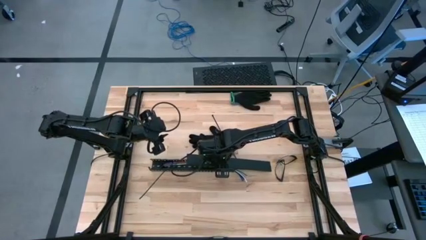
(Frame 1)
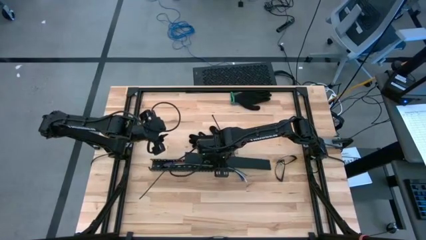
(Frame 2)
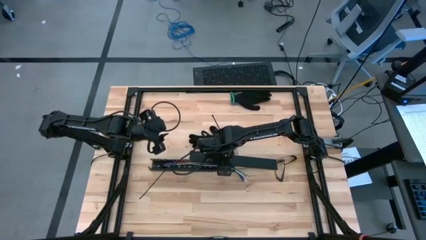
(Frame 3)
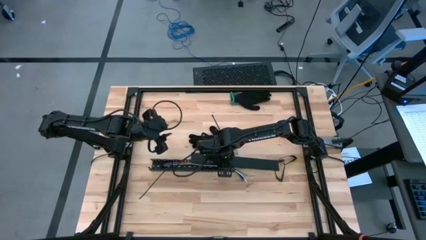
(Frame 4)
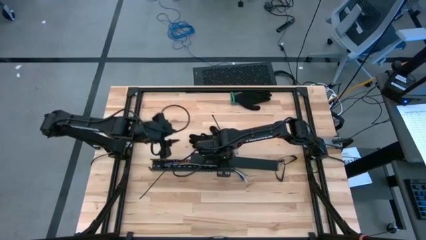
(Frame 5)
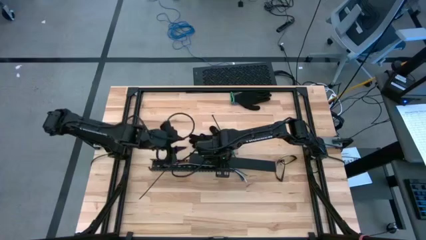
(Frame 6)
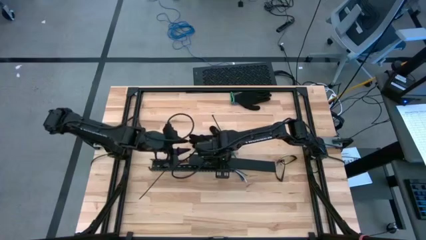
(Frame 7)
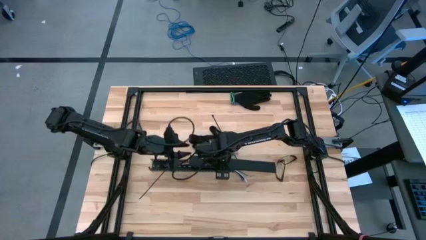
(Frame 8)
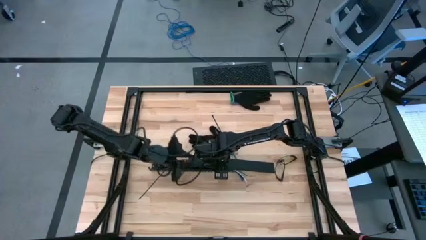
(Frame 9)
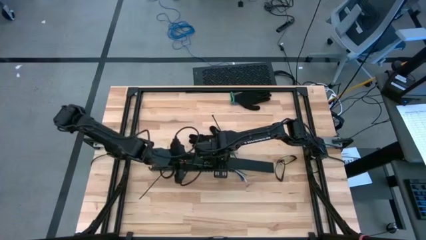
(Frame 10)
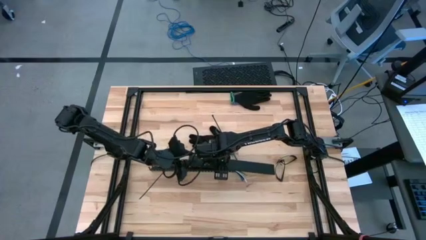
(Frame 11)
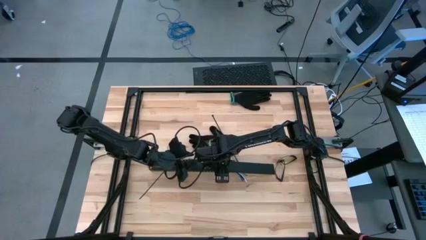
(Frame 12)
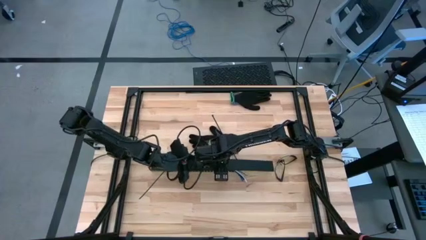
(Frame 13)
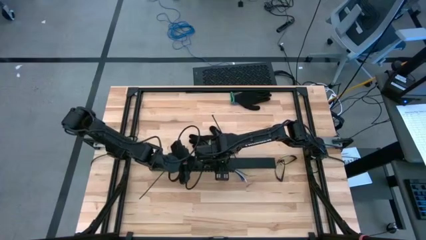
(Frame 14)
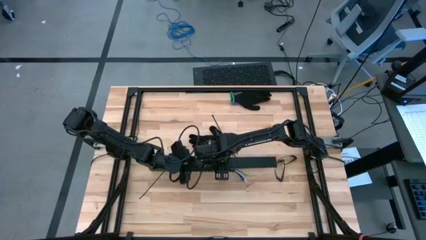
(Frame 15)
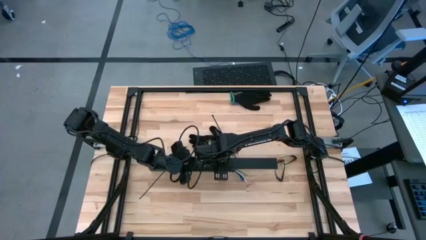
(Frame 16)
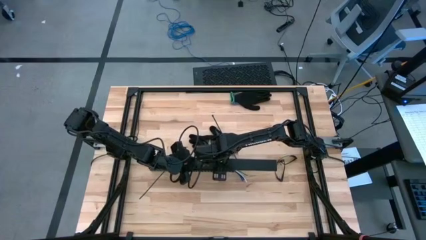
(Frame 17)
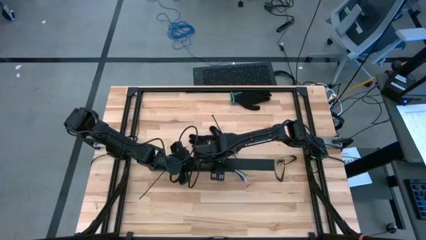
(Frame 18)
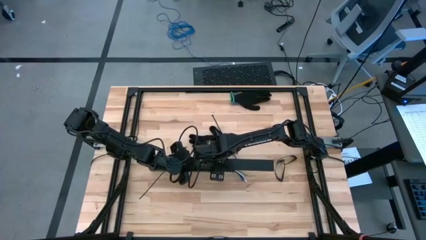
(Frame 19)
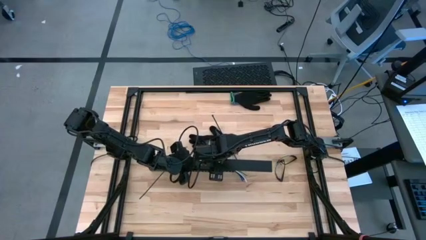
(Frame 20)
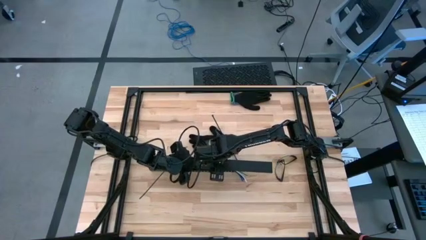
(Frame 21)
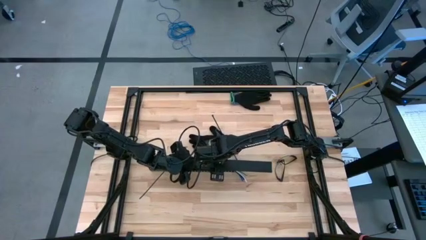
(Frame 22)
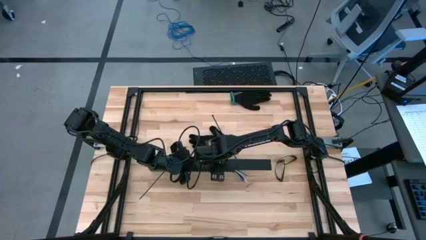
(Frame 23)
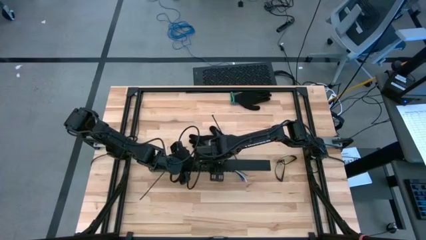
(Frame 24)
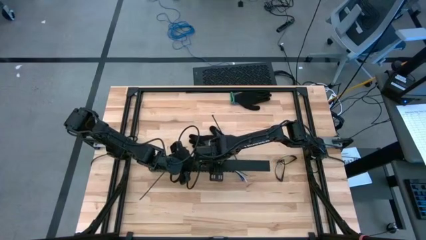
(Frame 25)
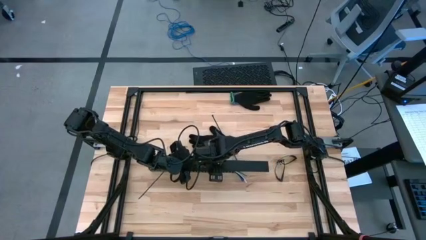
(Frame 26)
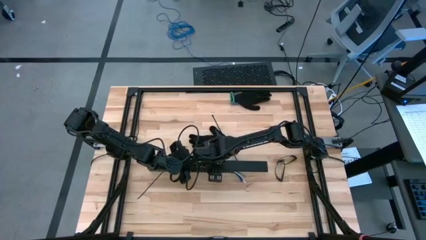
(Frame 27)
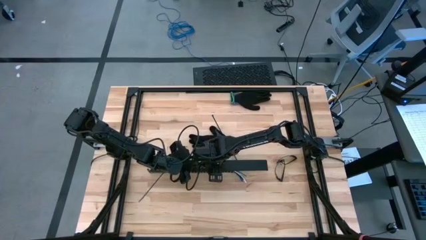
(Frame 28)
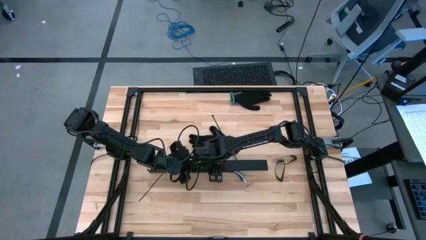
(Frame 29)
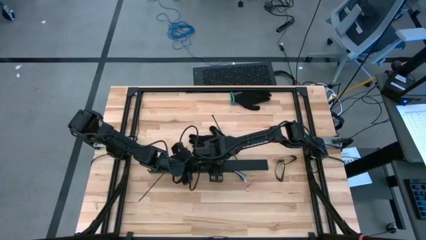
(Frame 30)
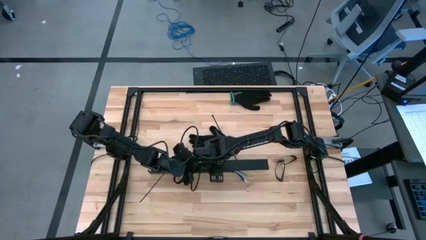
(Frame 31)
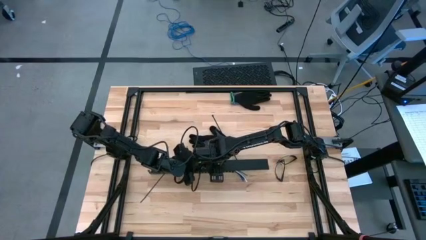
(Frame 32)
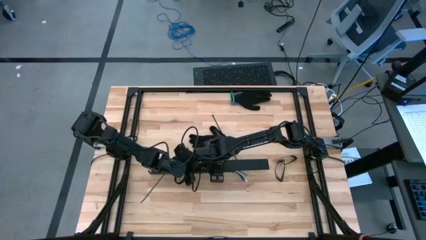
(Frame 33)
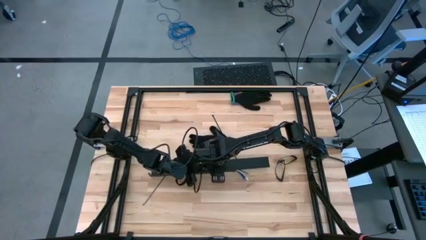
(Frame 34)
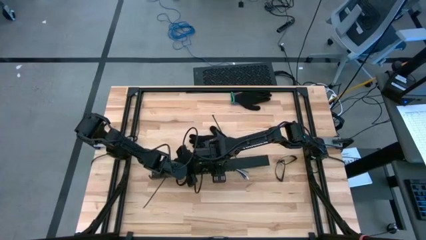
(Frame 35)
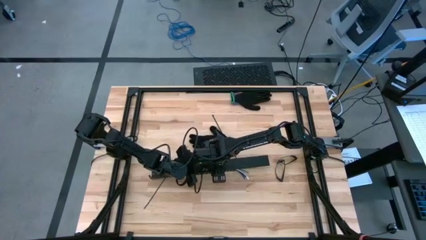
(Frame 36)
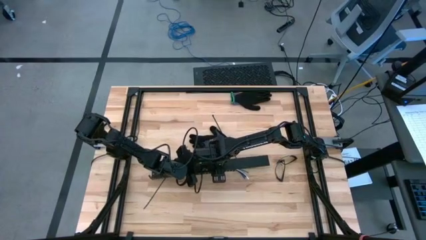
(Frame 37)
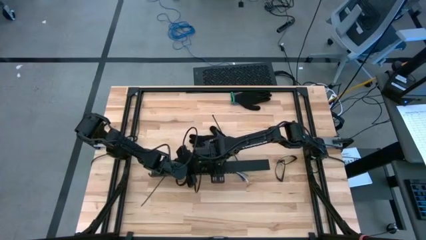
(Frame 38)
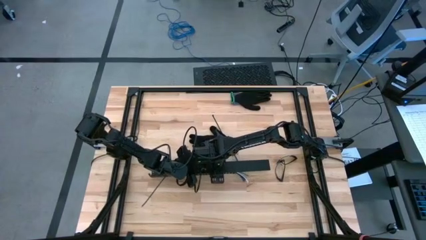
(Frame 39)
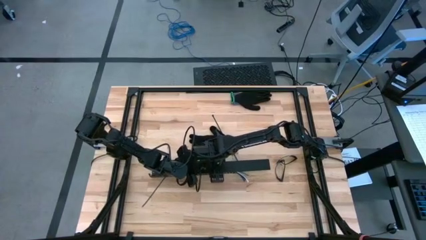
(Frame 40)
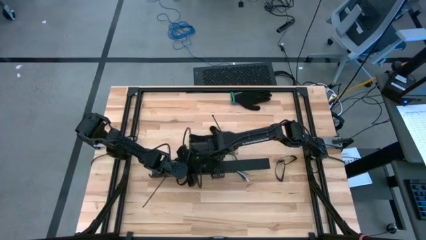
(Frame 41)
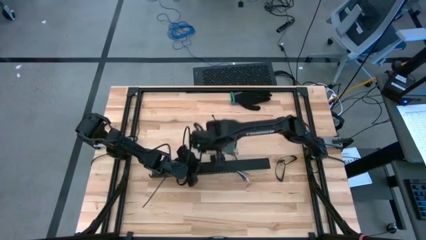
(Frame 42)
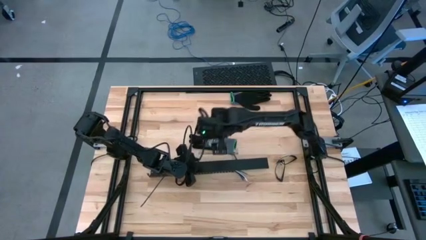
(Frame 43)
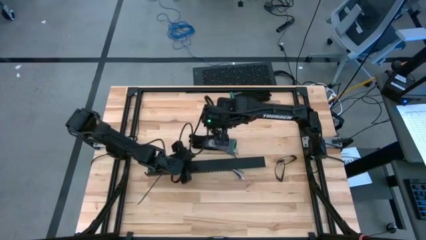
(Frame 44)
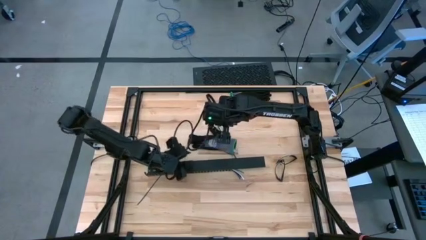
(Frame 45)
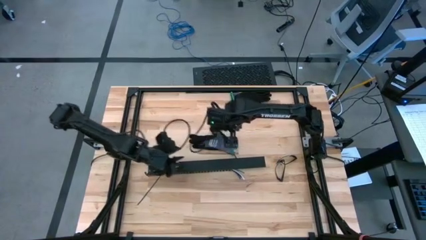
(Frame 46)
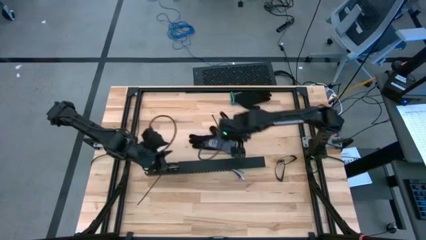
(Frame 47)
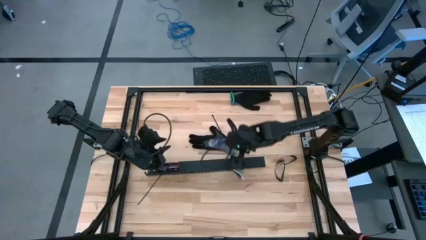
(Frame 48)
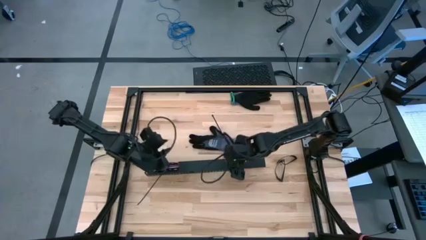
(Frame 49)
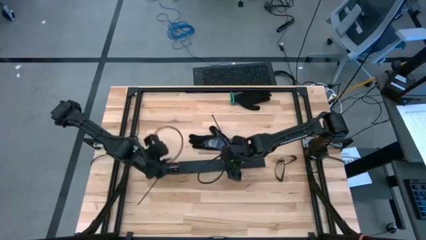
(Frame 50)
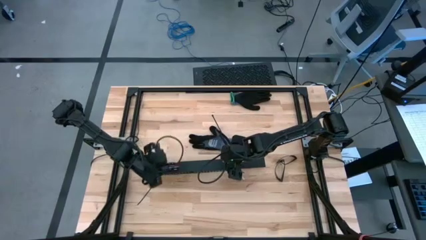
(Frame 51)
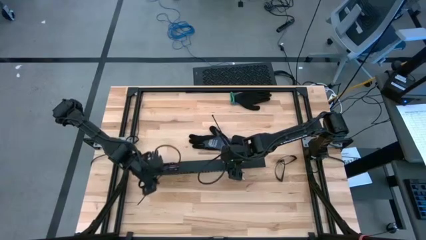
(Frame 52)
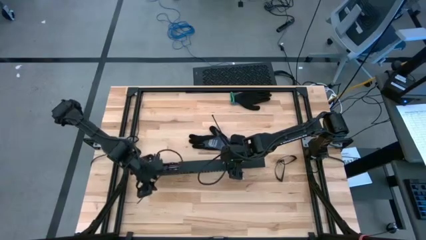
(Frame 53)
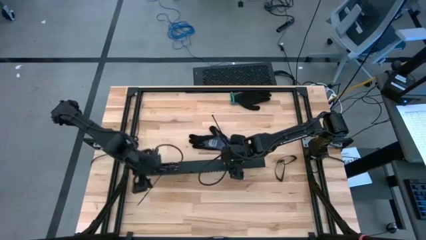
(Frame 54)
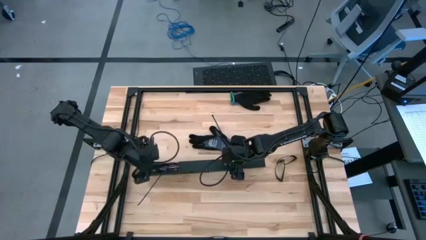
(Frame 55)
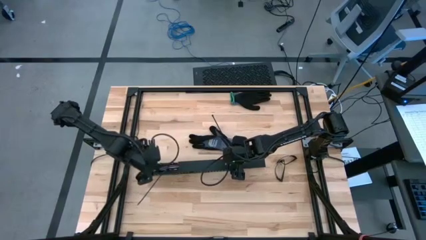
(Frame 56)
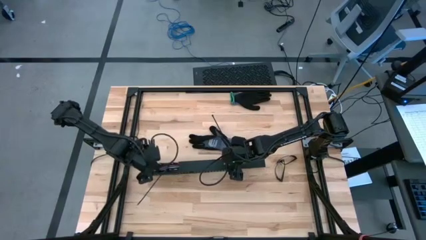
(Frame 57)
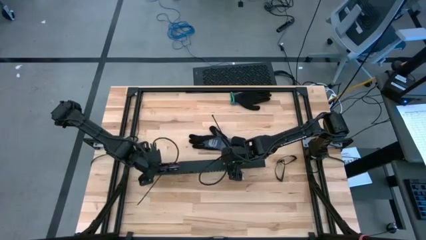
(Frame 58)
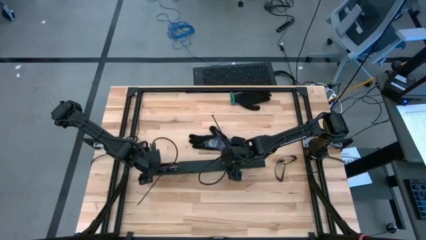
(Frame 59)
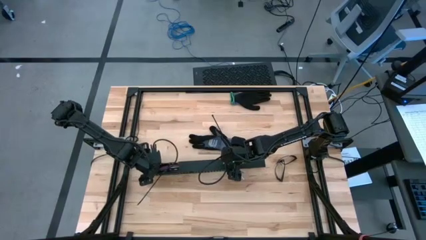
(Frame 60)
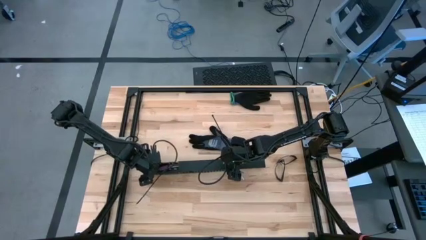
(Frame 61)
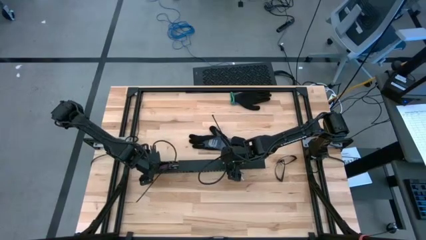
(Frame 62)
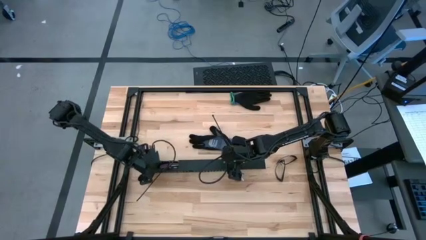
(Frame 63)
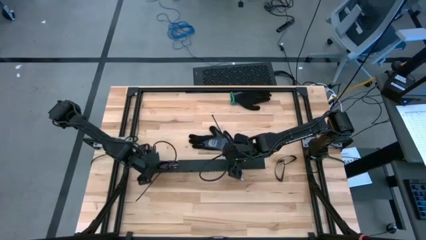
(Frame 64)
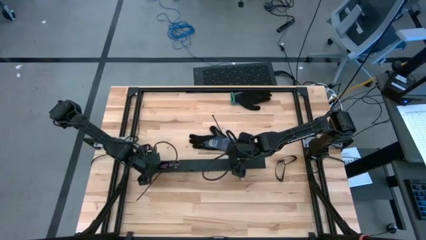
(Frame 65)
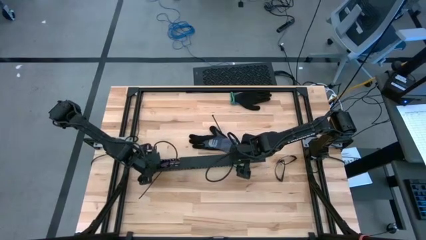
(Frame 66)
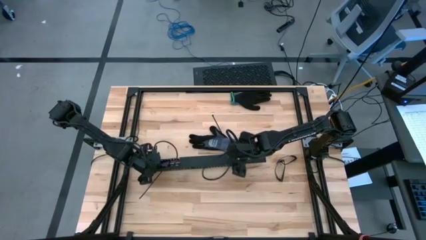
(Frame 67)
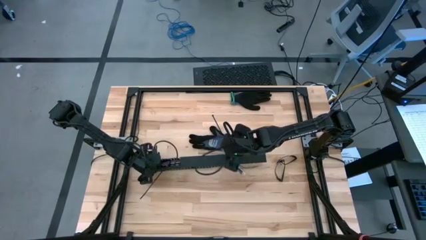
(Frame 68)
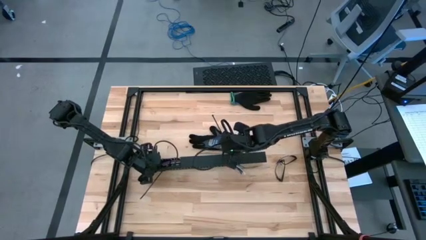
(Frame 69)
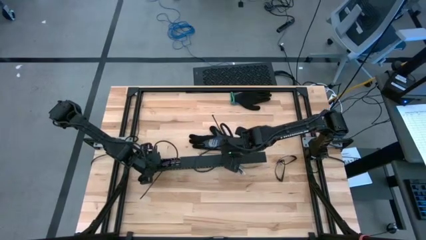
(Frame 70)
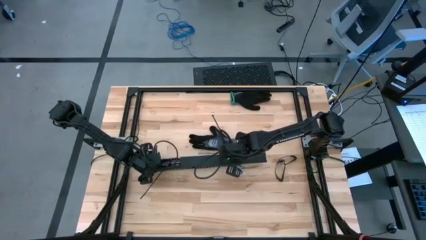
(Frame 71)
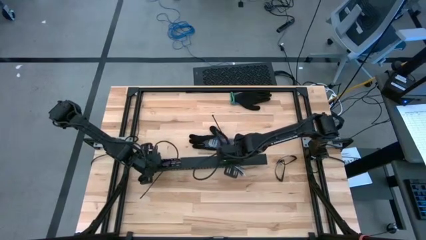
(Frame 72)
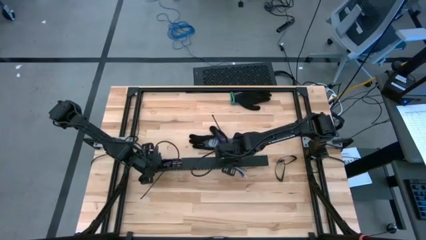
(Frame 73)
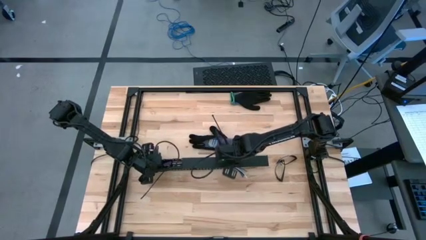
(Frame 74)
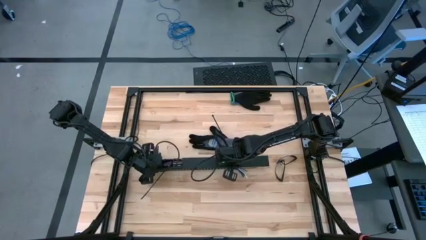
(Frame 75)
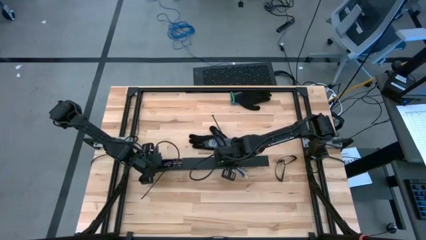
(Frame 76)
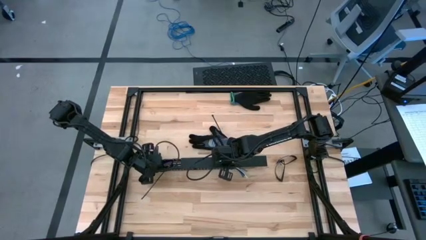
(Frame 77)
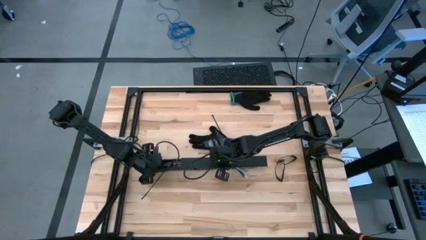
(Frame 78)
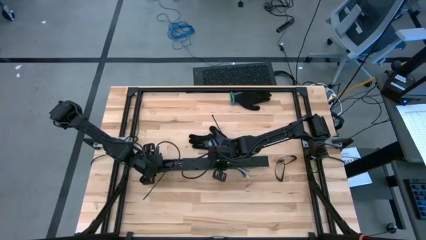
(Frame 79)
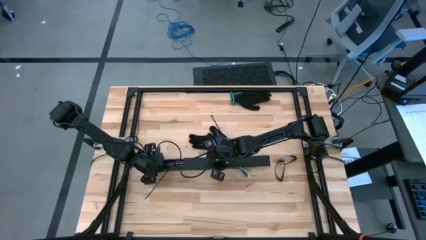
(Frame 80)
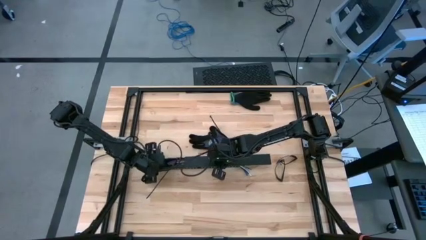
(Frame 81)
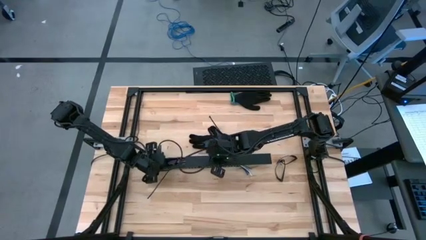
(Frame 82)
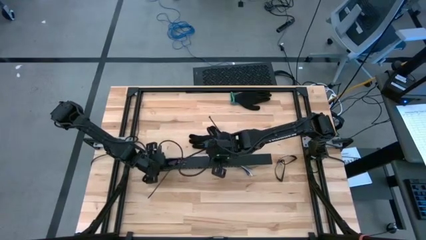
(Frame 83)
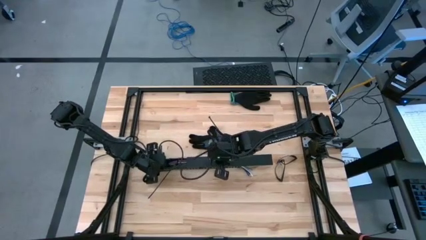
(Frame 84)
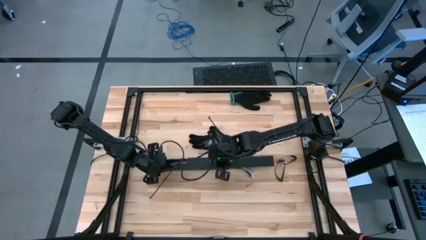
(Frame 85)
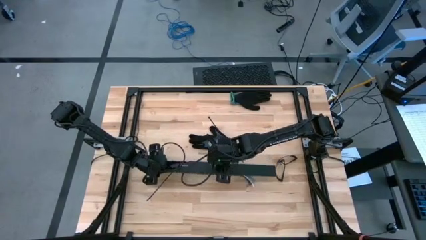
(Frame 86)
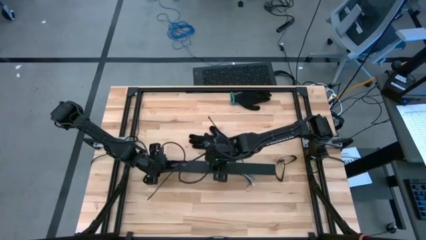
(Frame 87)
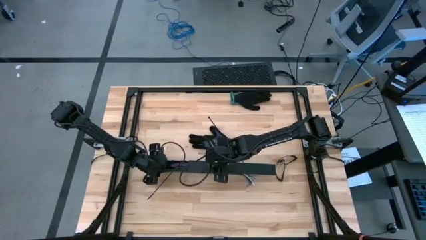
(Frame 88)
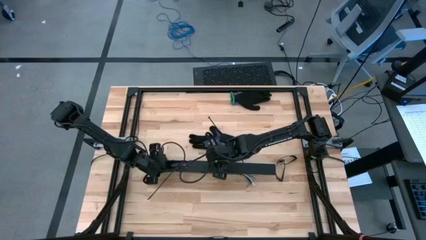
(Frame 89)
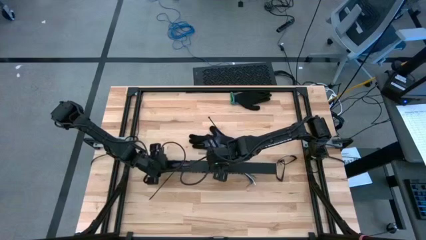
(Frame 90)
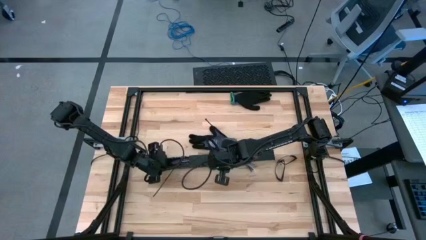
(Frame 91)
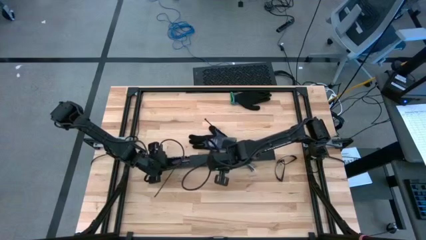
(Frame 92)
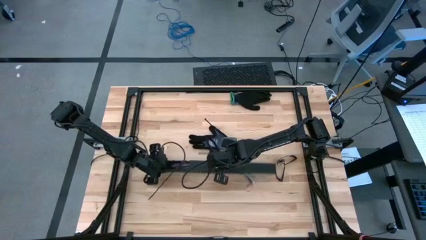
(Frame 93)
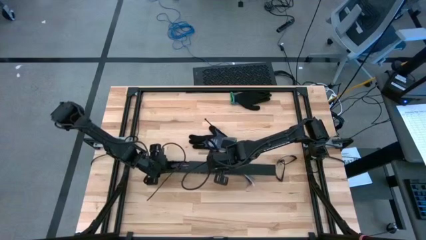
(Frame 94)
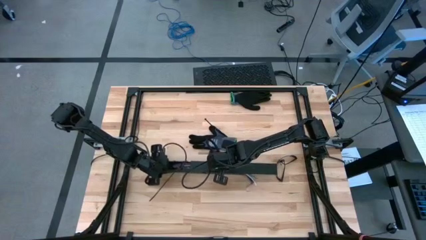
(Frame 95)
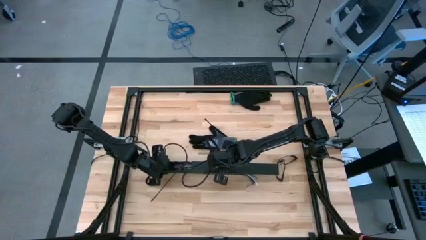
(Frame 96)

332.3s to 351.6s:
Task: Ziptie cables
Close the black cable duct
